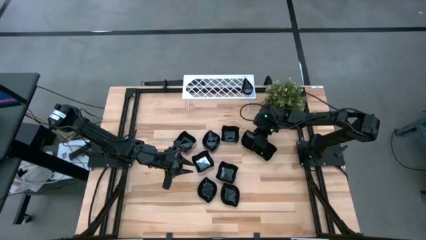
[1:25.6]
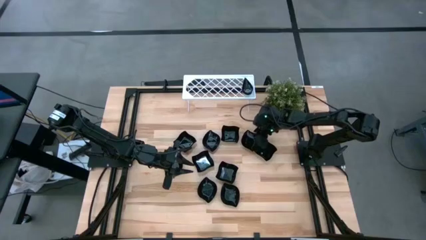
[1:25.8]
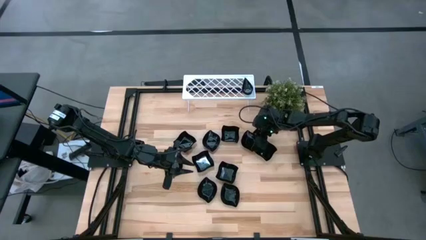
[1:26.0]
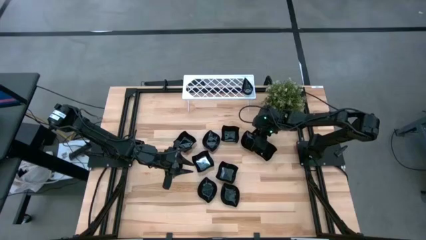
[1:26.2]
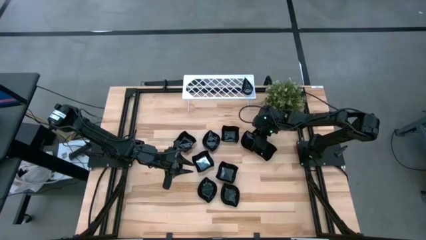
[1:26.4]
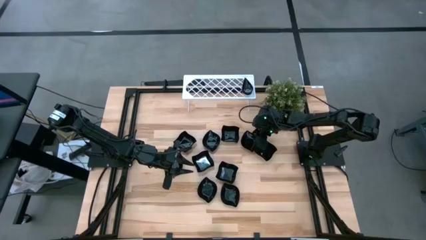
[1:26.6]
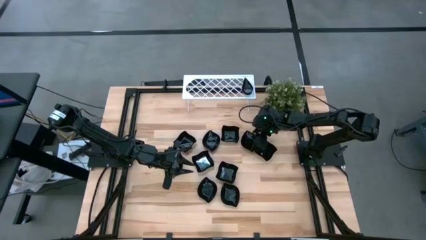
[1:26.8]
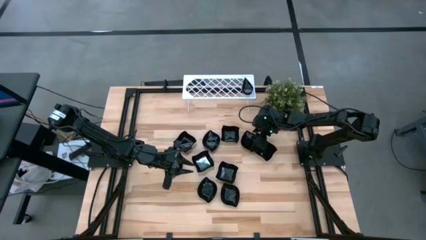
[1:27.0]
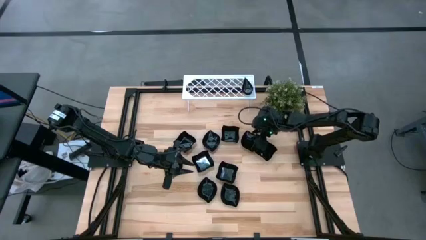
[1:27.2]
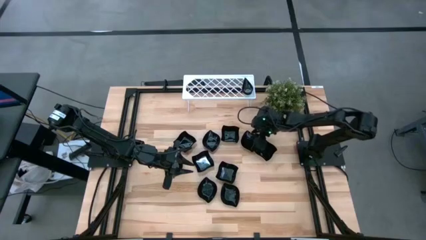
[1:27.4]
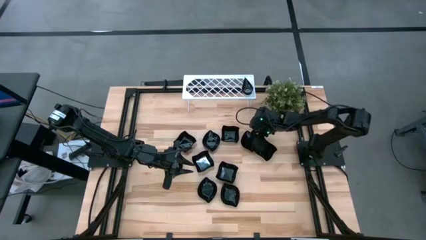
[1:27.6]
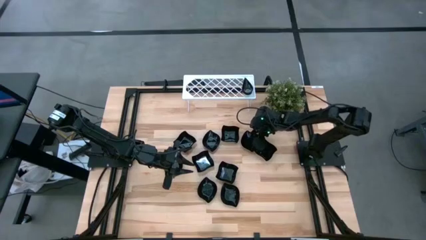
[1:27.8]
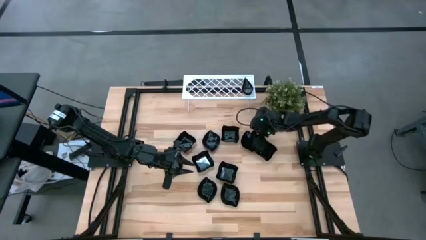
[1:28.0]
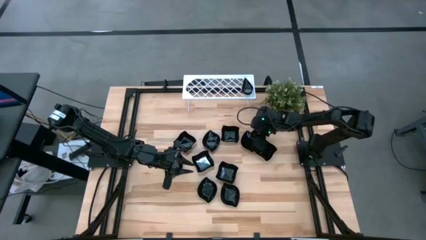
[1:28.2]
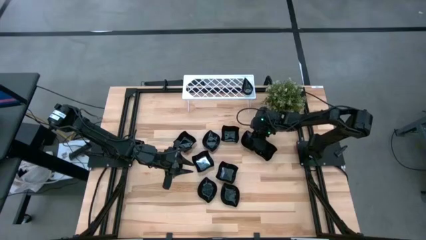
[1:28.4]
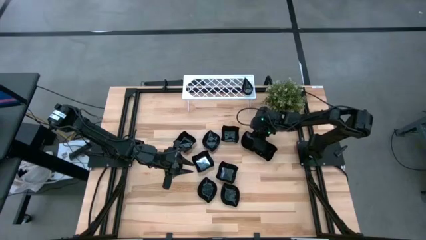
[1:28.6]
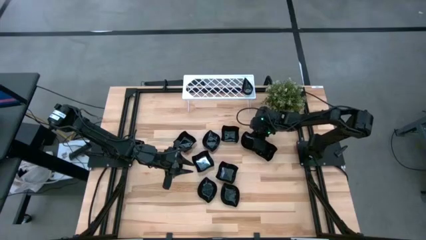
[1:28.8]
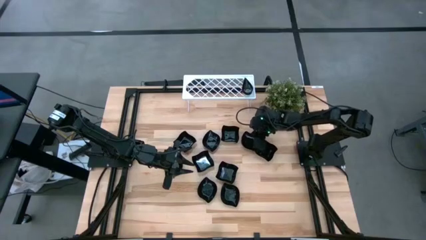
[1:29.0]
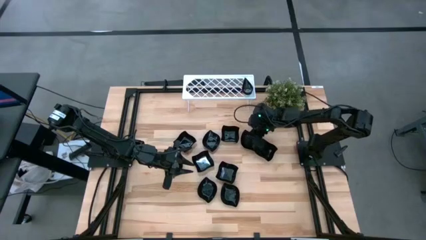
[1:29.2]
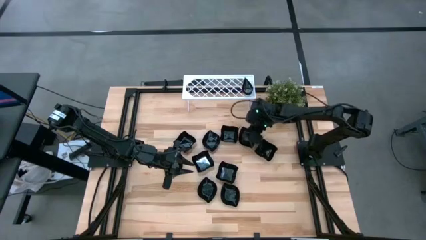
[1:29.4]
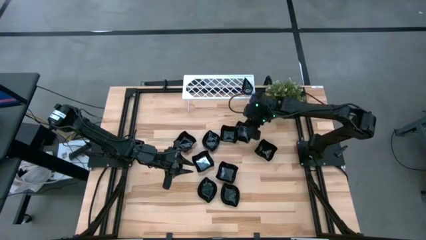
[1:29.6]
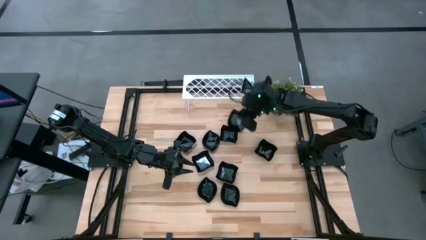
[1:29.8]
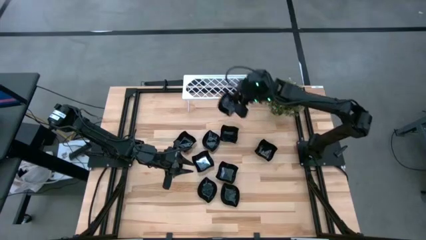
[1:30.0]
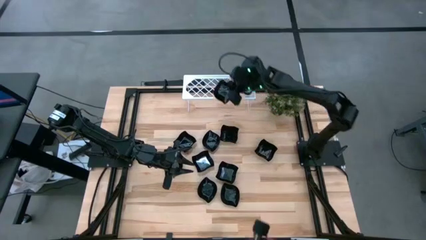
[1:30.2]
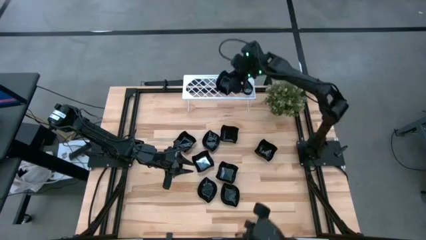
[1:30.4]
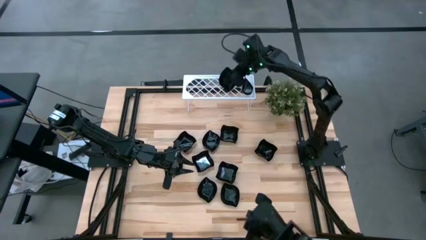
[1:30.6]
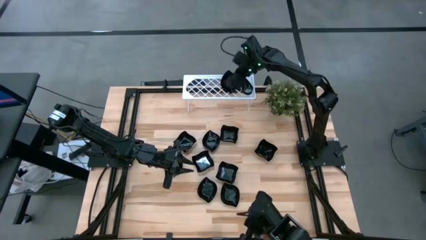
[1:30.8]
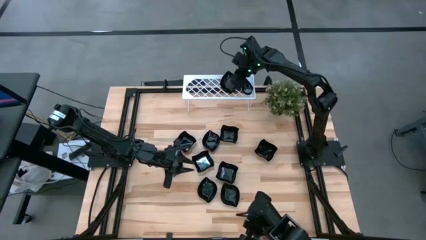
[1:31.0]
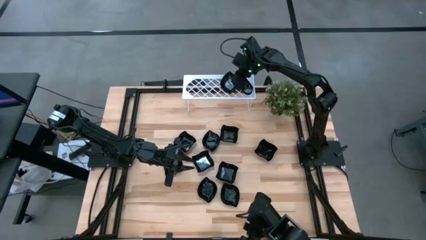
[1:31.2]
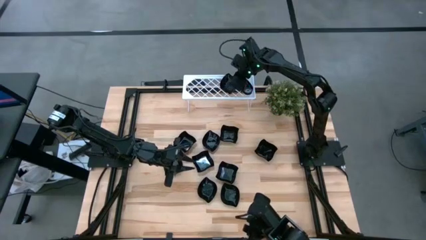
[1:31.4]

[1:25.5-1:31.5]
Task: Pick & Place Mini shaped plates
Put the leaf shaped plate on the shelf

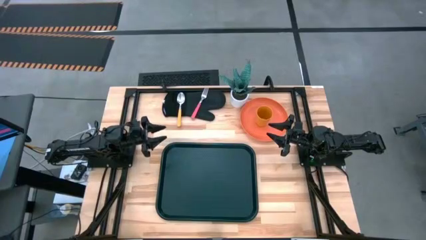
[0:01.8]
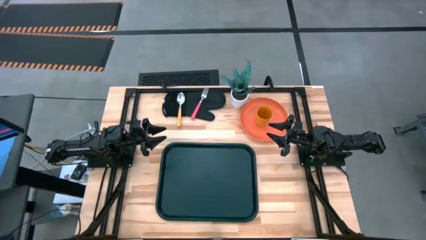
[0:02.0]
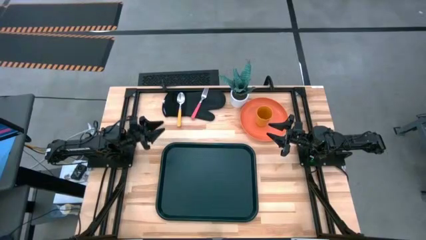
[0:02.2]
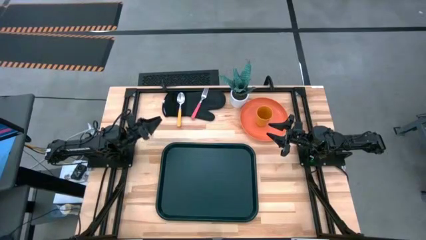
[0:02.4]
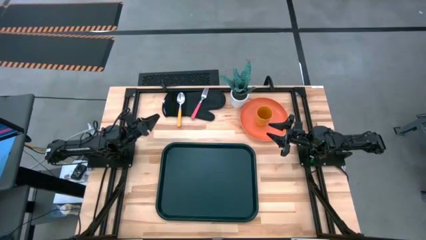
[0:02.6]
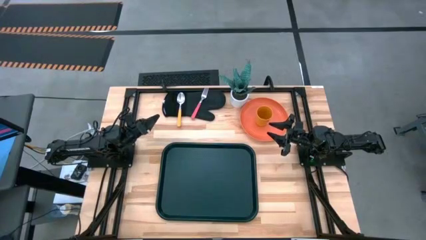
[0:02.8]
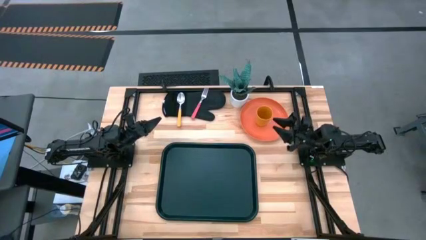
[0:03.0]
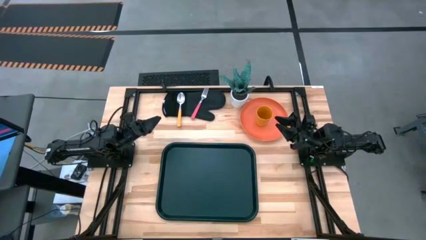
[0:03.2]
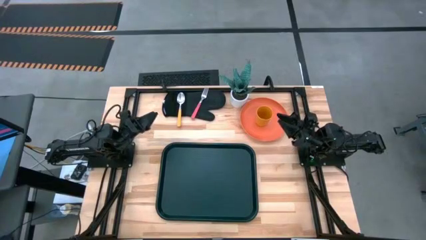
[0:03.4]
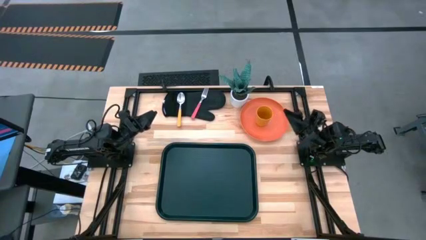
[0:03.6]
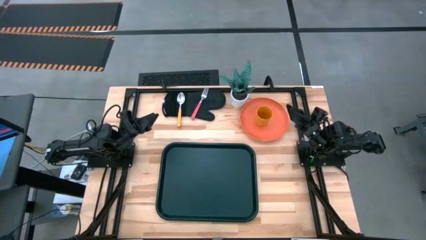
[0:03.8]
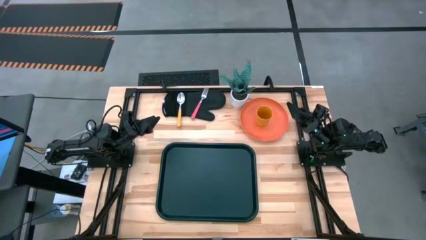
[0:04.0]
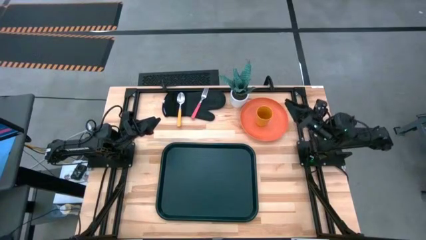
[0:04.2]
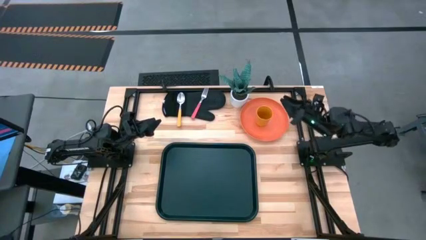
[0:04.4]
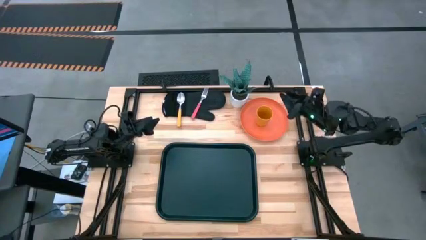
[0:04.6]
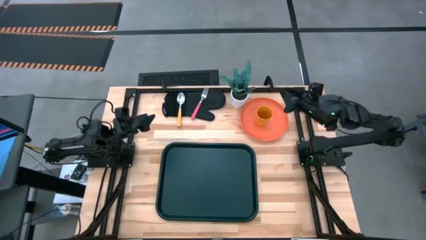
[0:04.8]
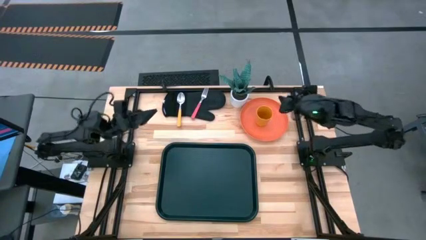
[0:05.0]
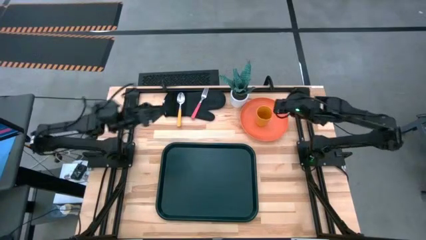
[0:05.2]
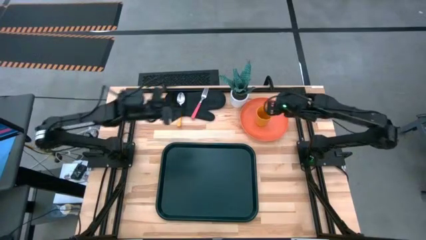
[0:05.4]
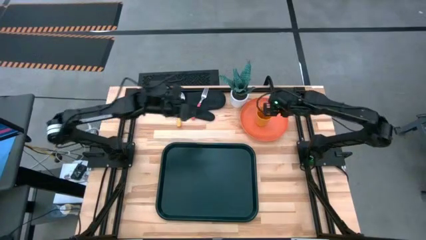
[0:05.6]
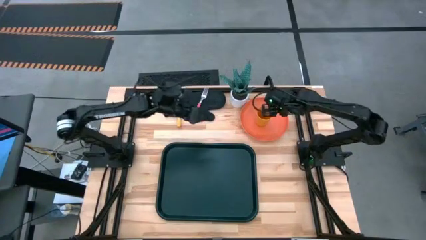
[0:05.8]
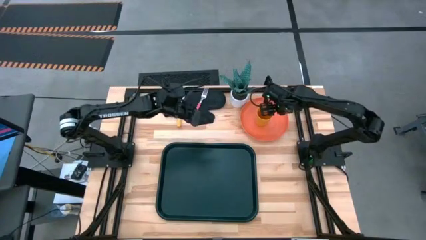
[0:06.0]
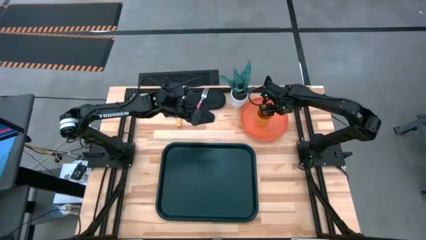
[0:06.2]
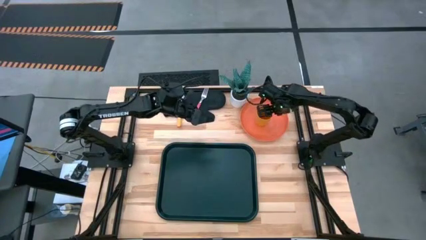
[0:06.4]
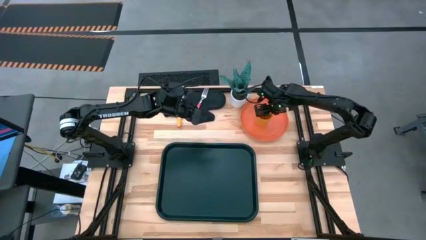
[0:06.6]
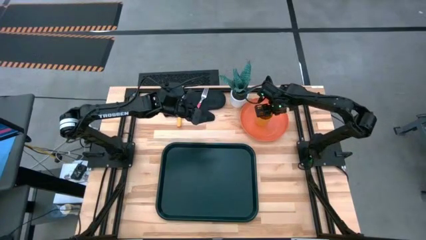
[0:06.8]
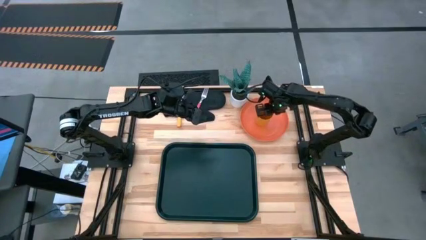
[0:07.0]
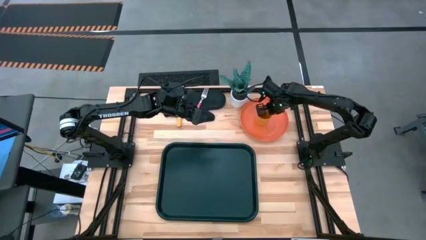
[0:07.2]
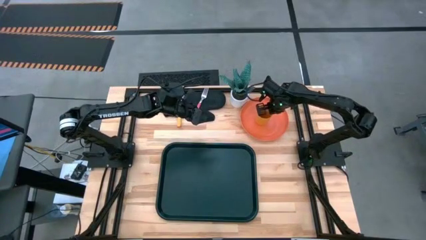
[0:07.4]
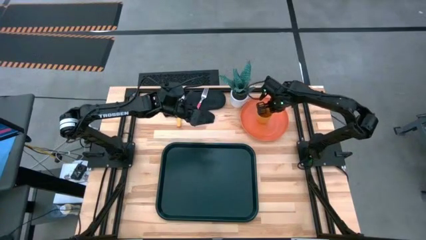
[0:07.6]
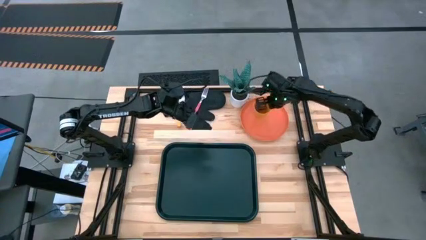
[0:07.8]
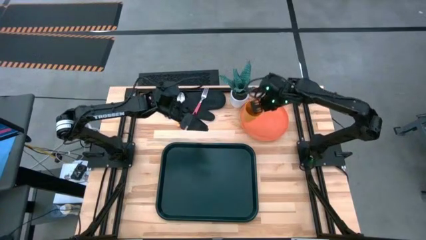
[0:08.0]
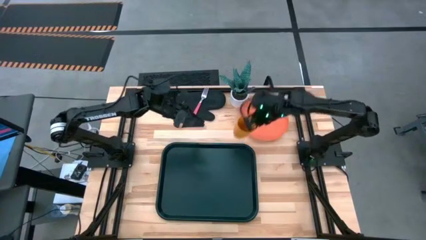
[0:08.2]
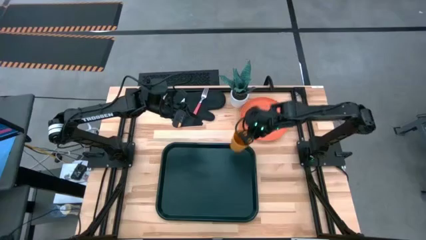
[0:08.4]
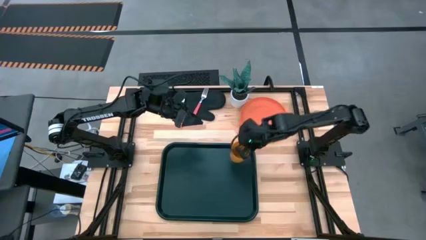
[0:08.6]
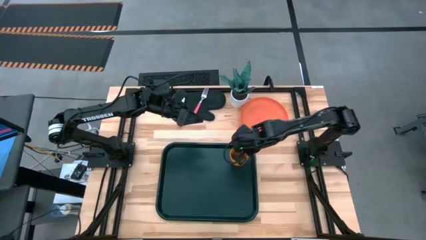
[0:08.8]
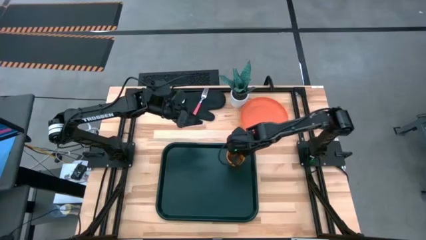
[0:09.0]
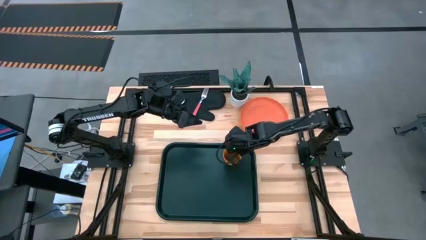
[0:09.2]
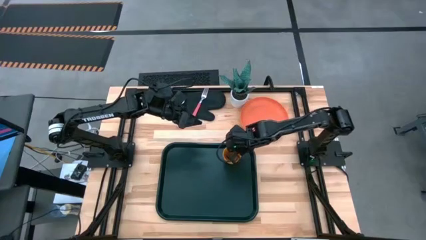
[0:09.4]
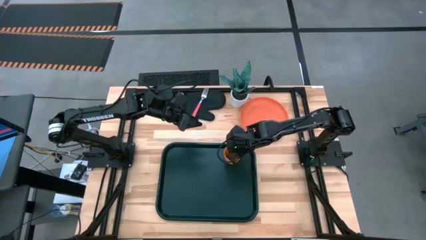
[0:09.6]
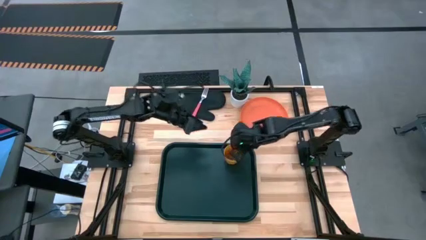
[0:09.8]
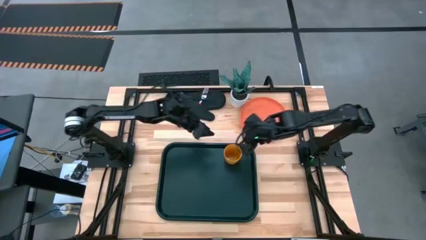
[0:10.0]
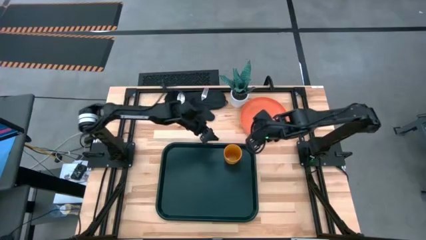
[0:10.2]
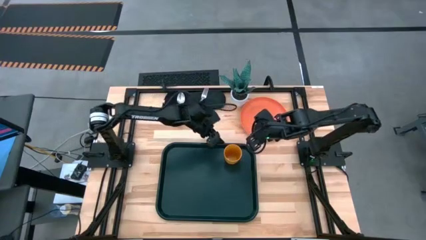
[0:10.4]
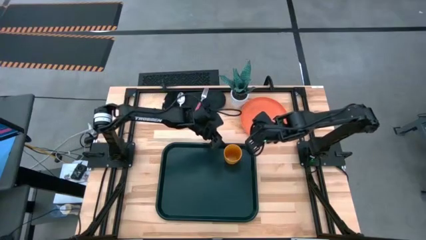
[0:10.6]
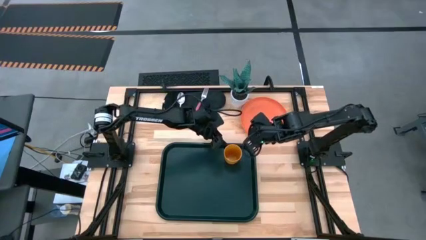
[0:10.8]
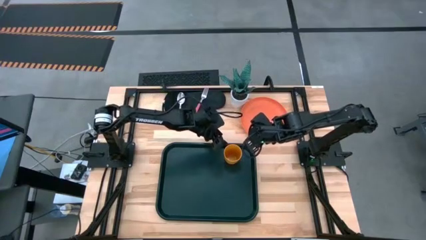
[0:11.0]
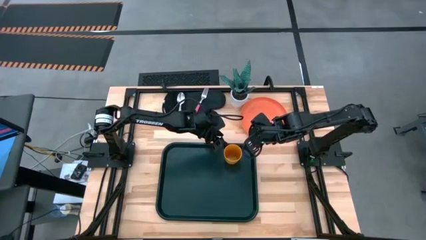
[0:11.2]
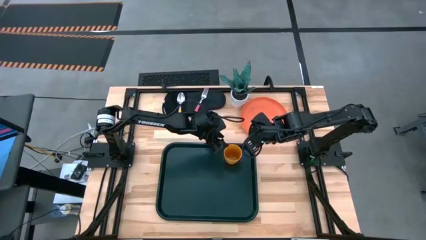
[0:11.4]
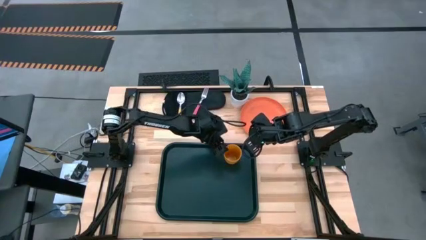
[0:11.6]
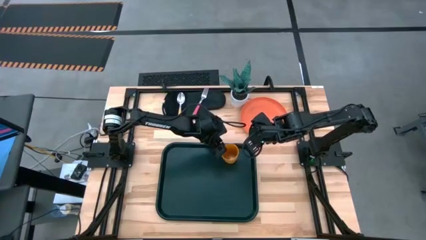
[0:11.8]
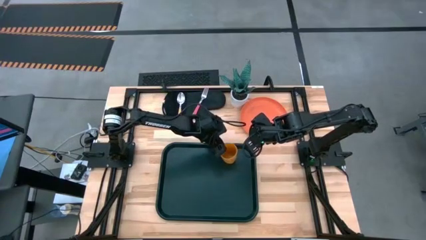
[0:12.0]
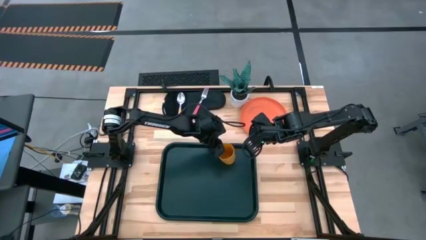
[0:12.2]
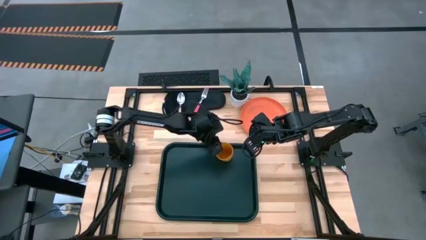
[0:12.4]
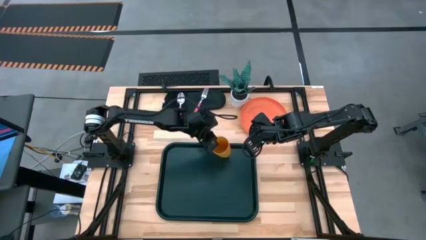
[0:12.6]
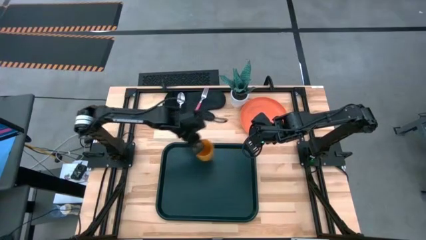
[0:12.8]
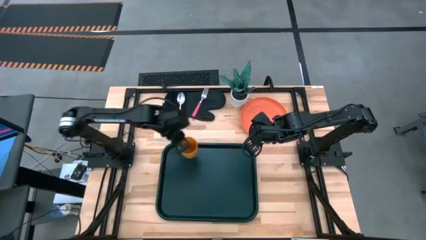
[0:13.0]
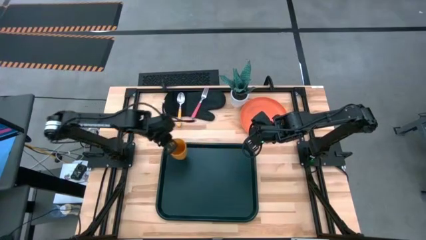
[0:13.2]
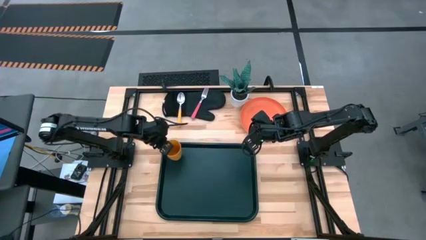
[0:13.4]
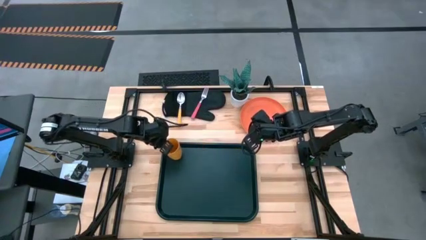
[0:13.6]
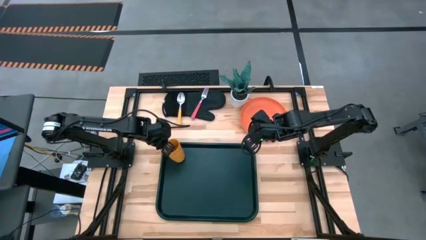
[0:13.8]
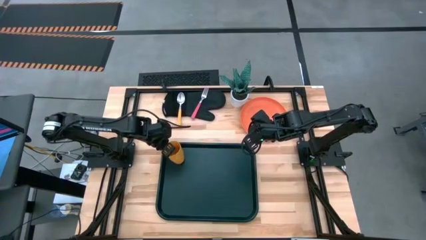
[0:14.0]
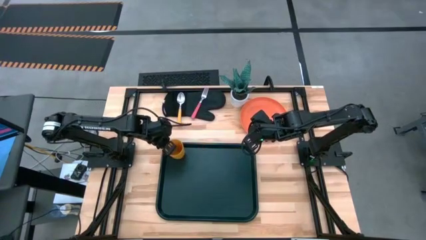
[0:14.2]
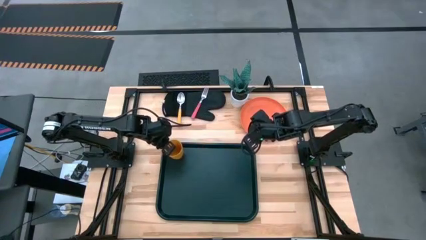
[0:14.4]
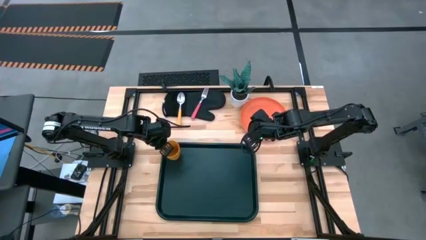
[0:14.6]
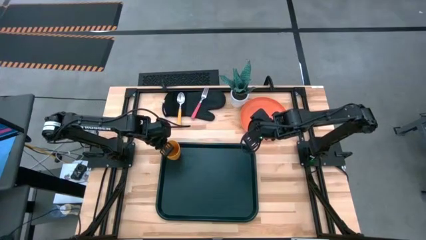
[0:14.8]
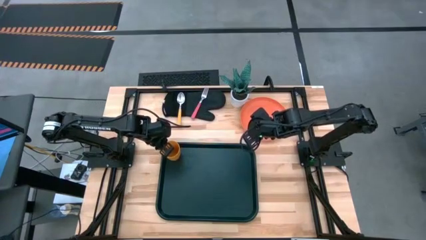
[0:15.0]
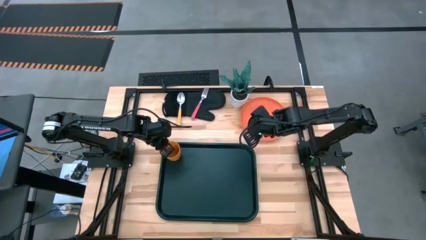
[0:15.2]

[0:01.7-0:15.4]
Task: Pick and place plate/cup/fork/spoon on tray
Put the yellow cup on the black serving tray
